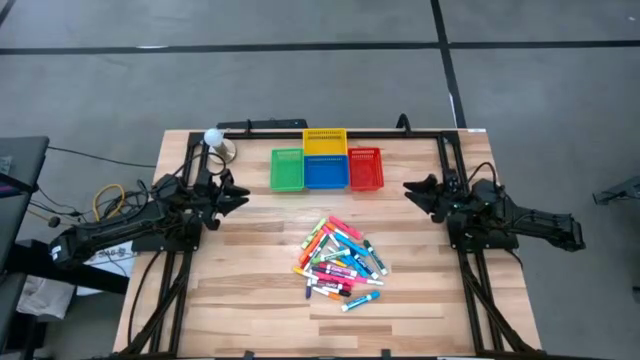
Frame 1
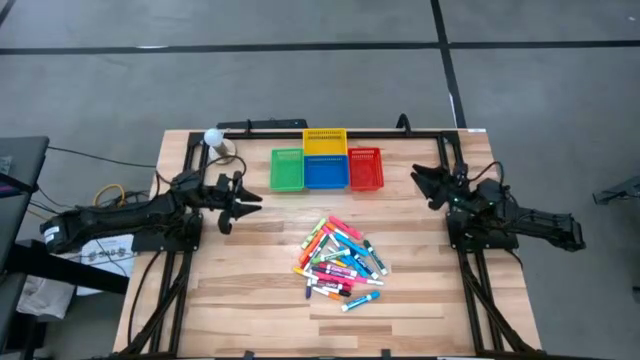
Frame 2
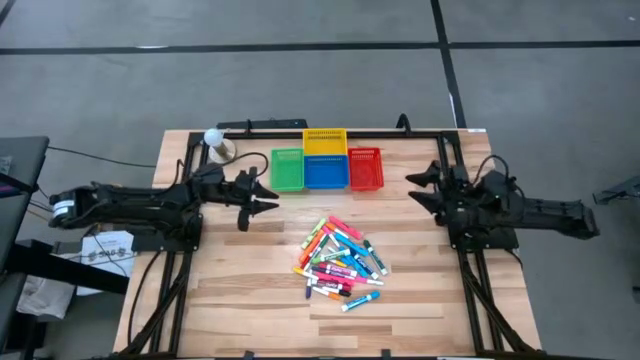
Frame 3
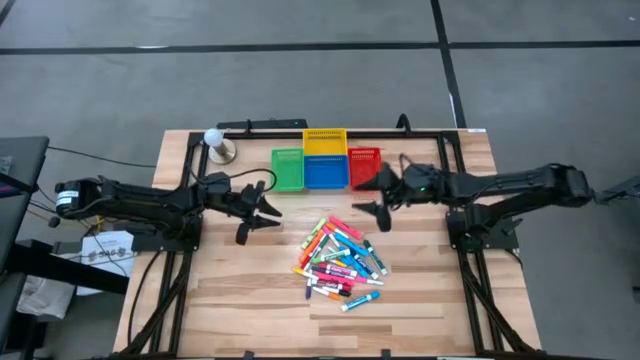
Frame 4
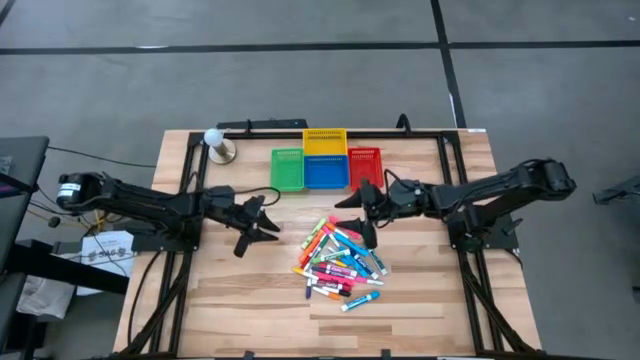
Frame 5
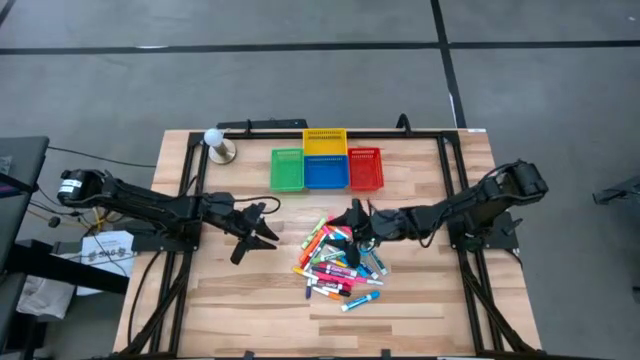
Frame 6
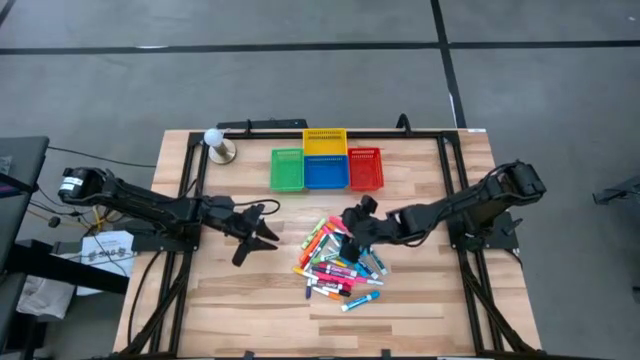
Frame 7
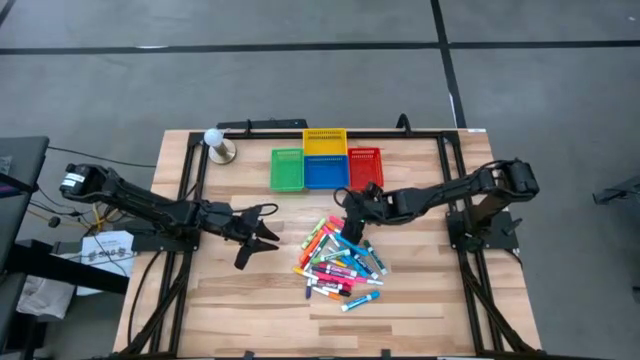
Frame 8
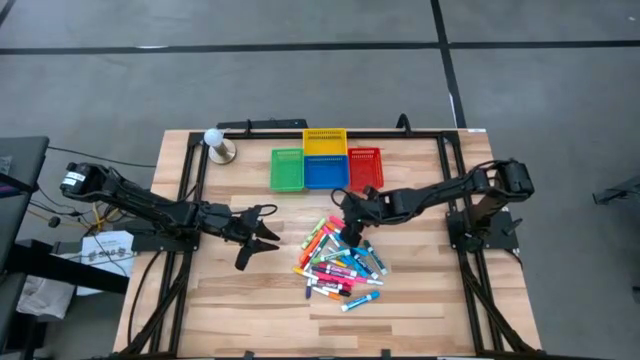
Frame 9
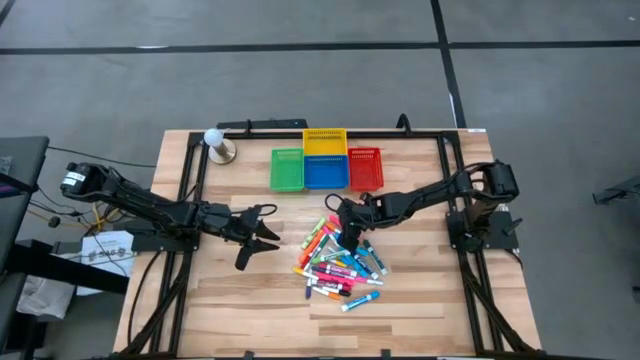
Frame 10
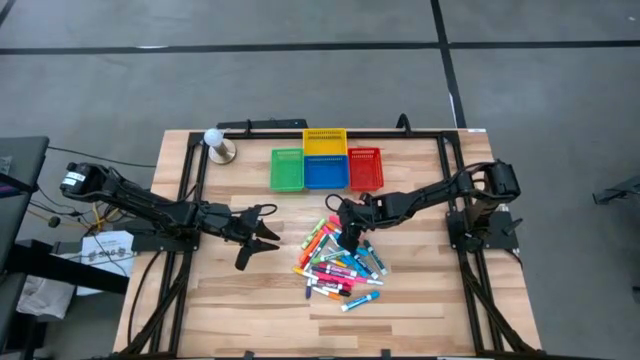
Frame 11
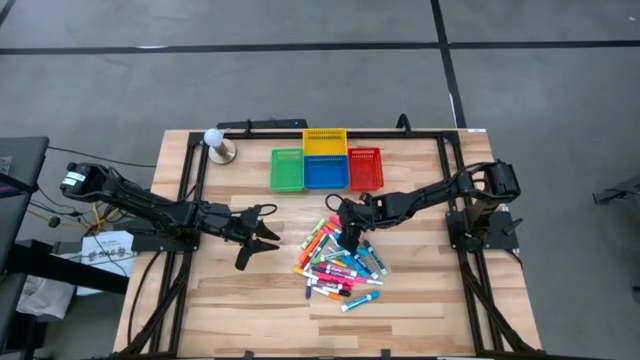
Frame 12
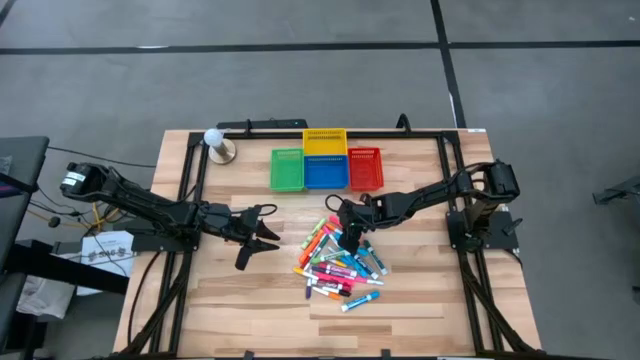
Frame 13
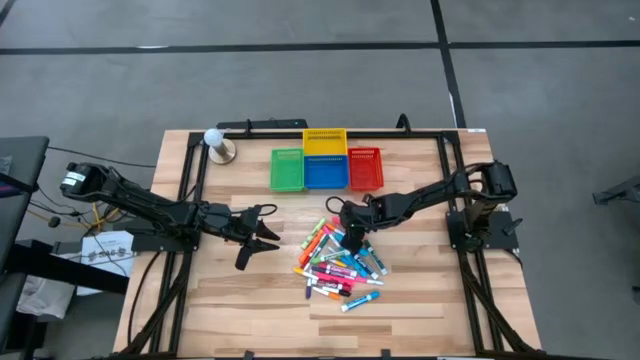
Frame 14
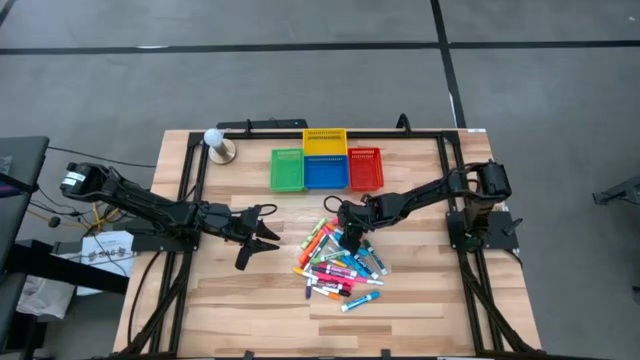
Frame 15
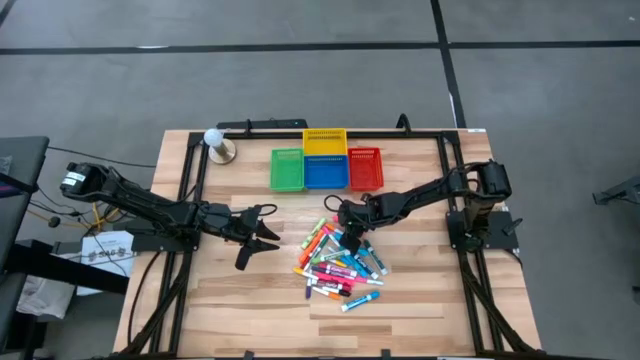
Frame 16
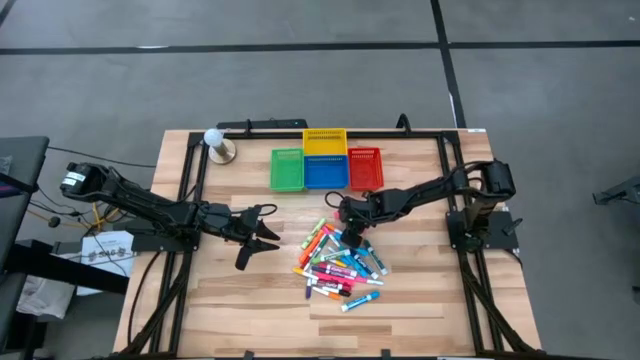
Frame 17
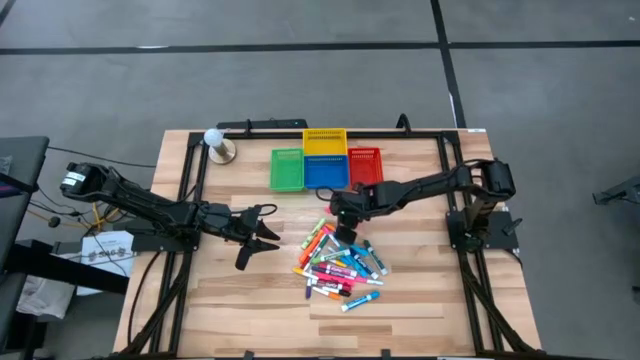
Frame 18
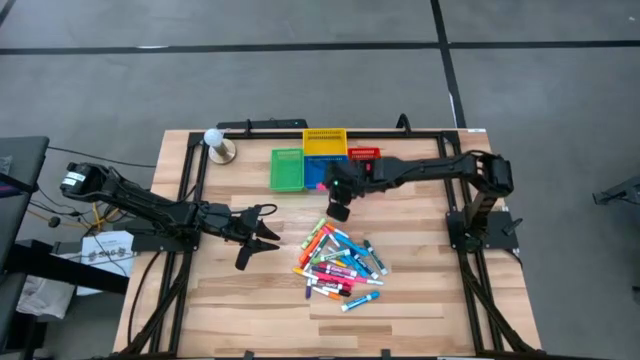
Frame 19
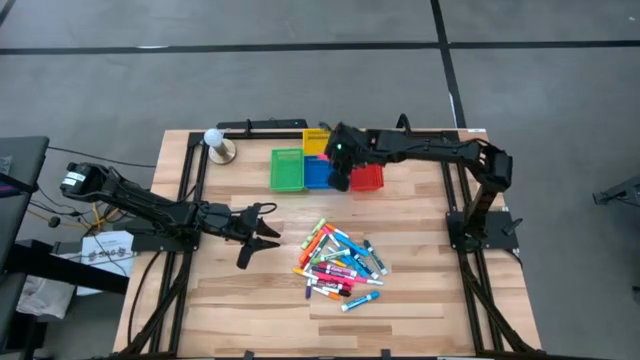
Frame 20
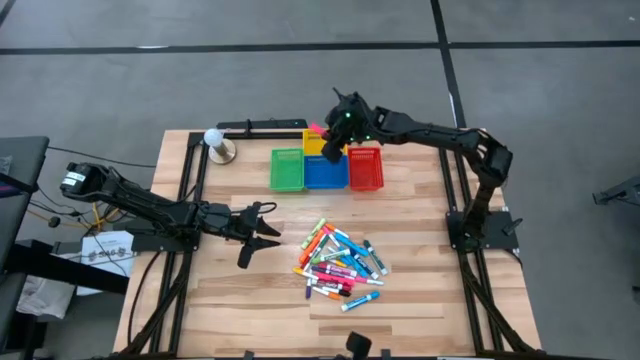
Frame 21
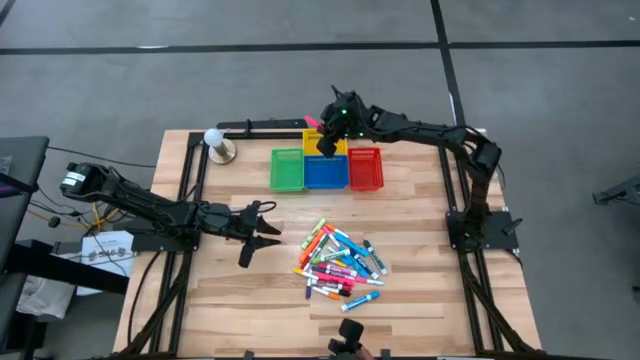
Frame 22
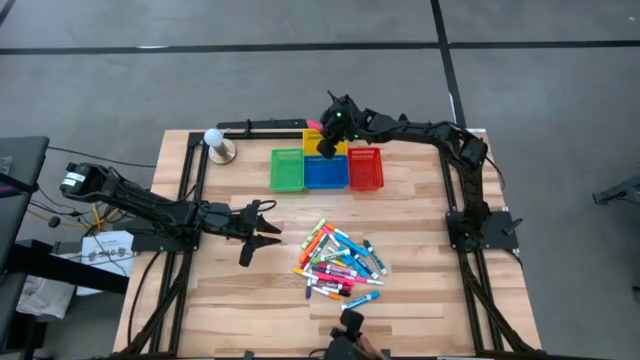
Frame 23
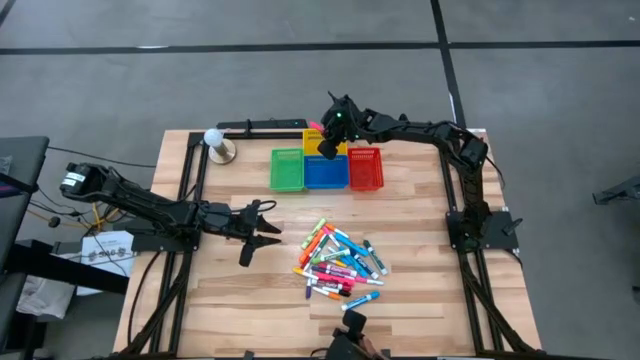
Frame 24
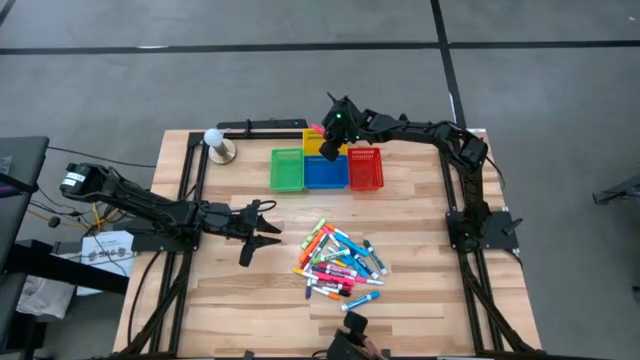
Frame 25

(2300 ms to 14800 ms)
Task: Pick & Place Markers
Put the top large pink highlighter pen into the yellow bin

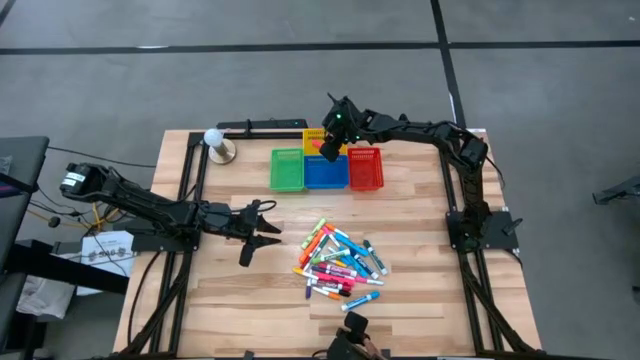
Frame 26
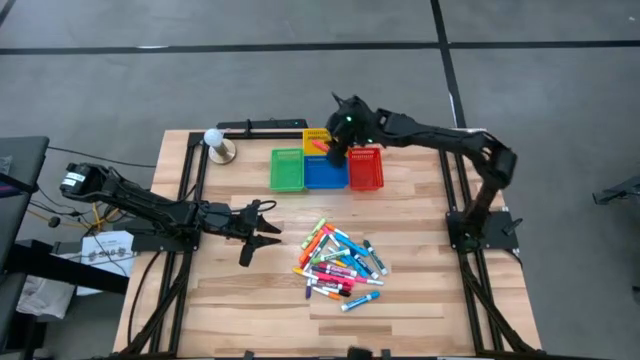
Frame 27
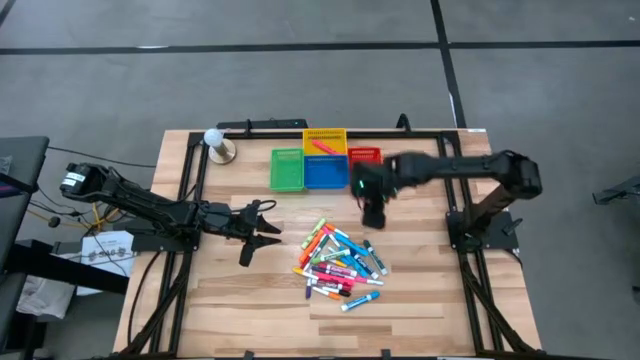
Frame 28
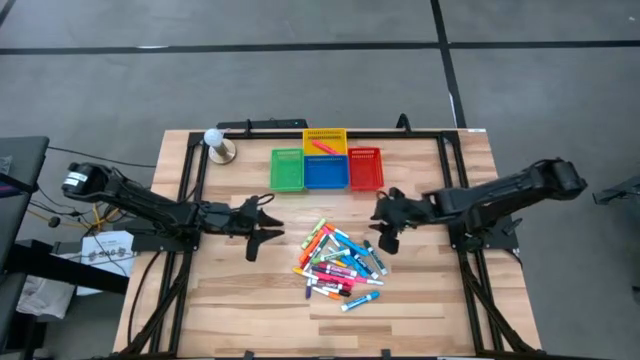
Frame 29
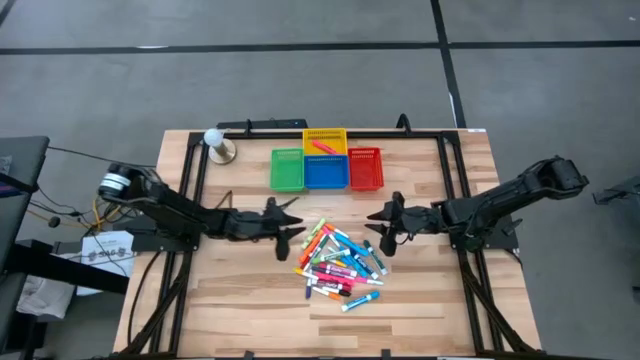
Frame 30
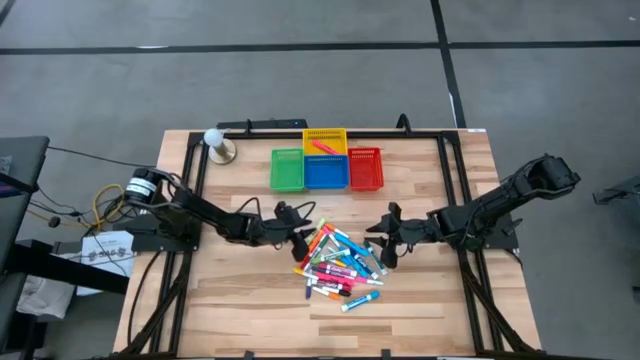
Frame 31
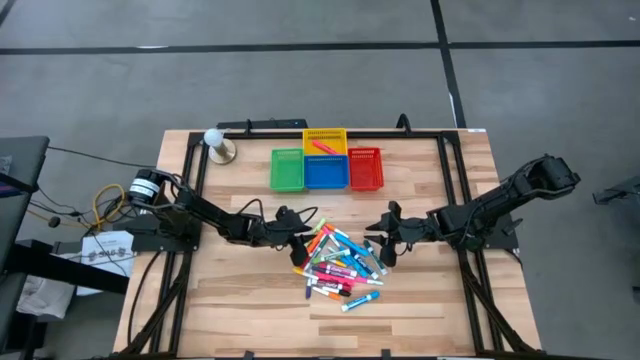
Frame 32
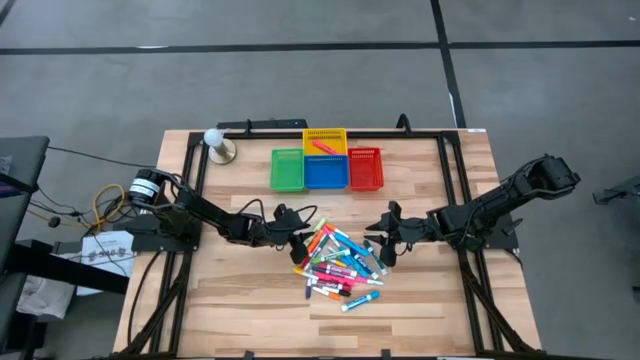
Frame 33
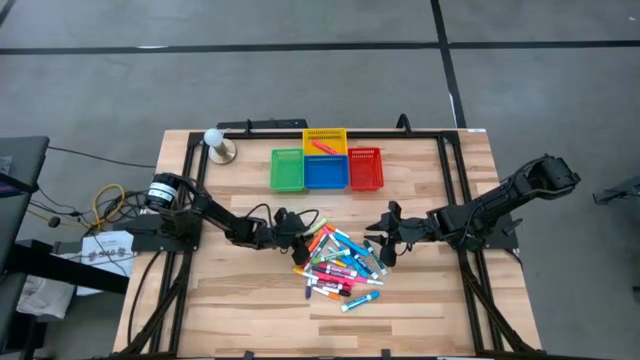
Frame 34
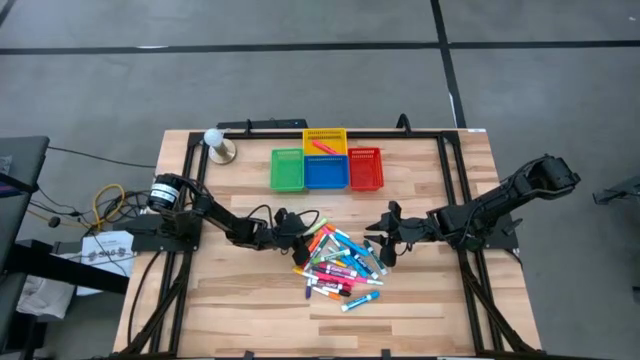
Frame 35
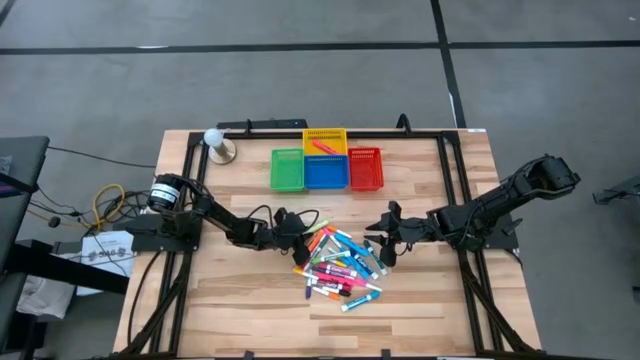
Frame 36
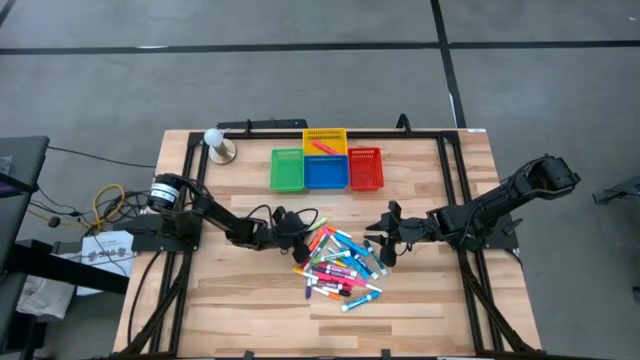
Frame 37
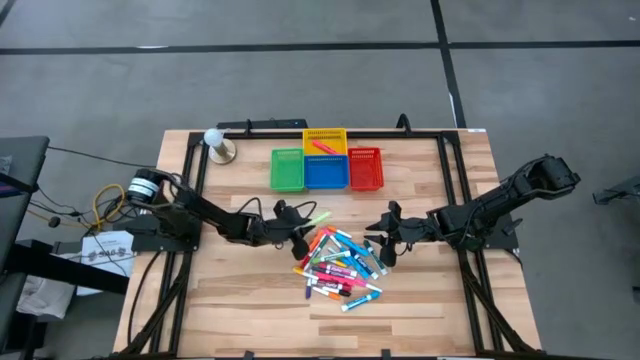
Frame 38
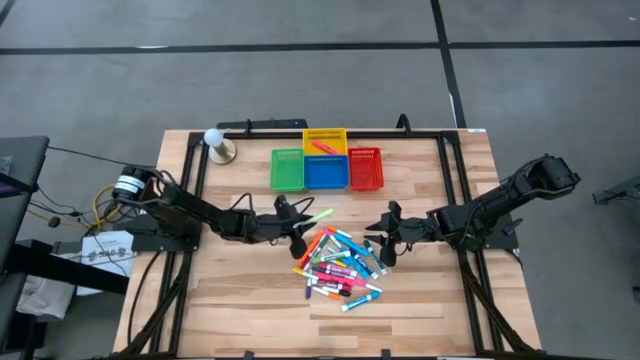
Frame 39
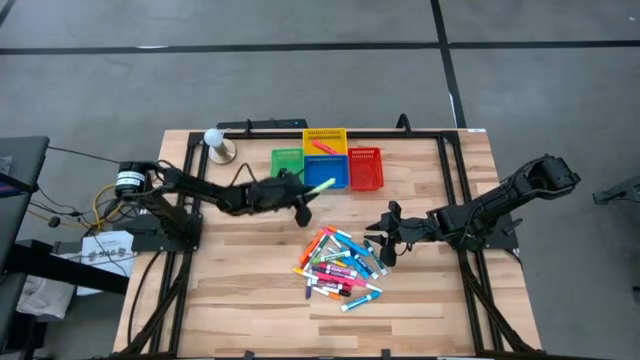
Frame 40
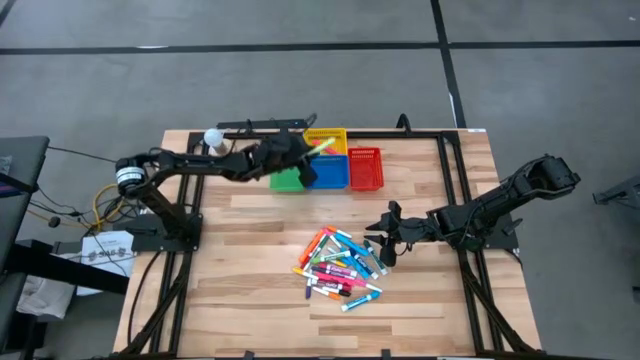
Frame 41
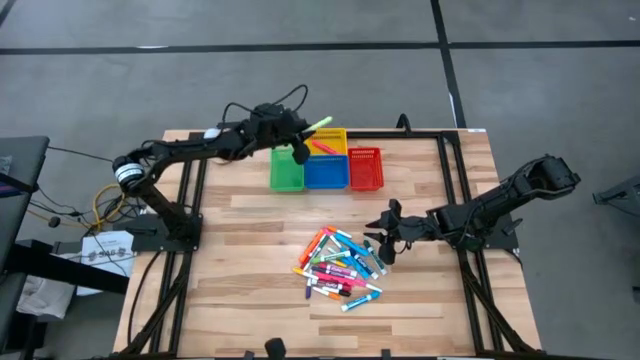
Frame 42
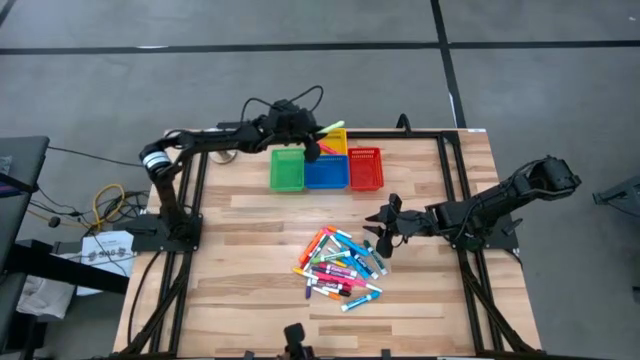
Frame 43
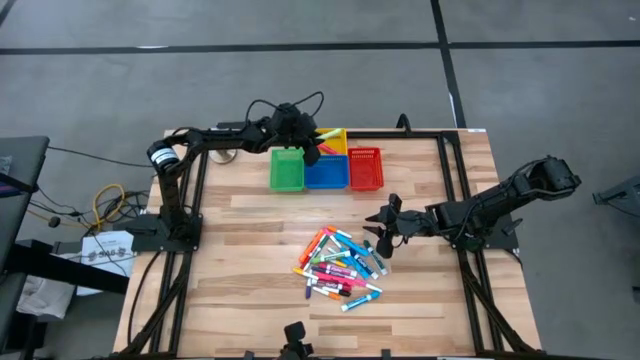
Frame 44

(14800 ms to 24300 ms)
Put the large green highlighter pen into the yellow bin
